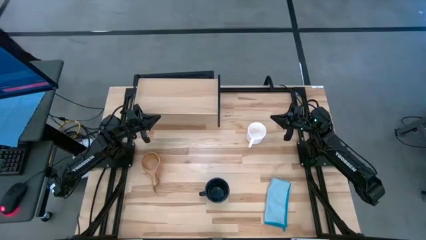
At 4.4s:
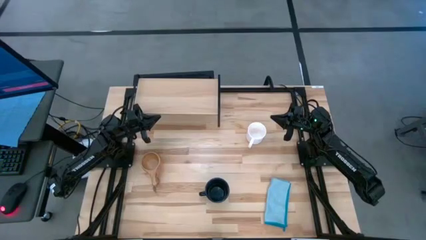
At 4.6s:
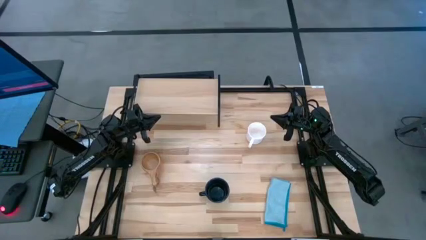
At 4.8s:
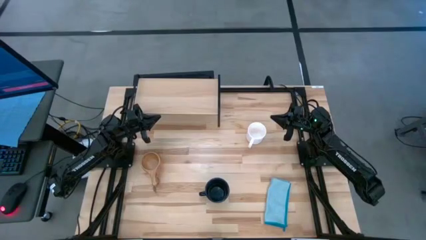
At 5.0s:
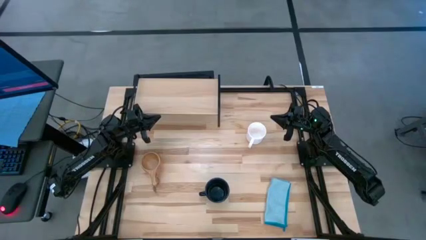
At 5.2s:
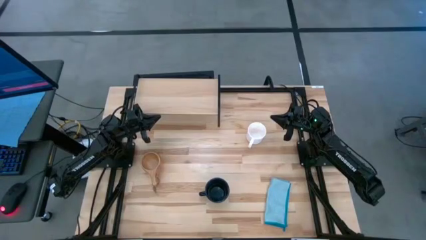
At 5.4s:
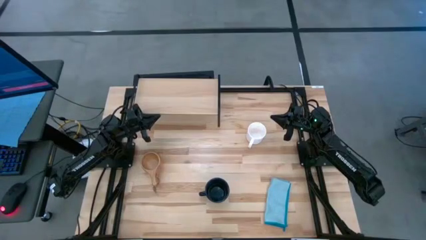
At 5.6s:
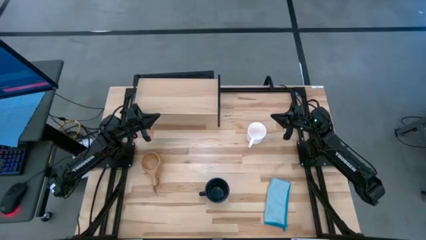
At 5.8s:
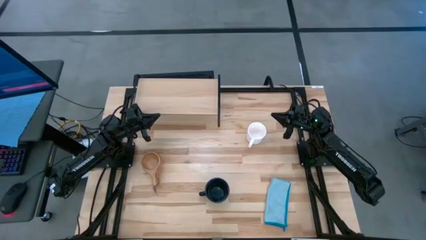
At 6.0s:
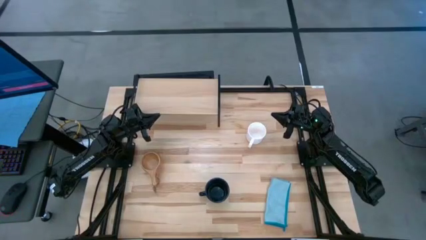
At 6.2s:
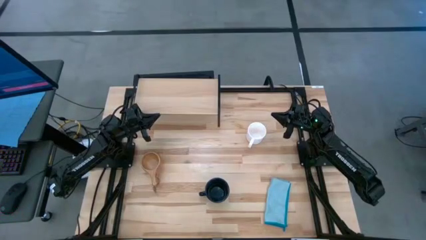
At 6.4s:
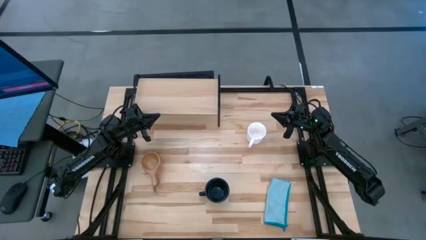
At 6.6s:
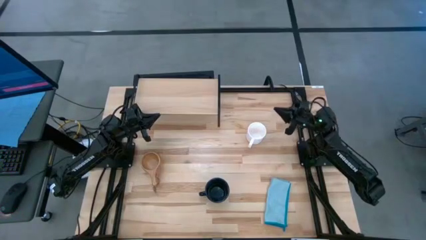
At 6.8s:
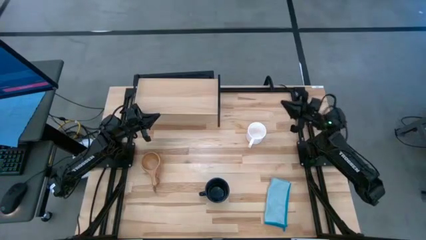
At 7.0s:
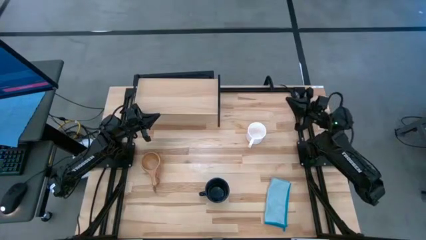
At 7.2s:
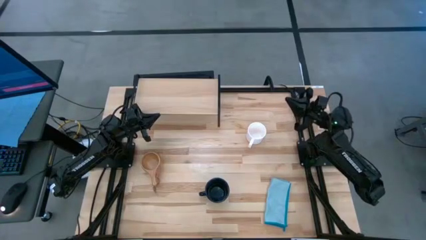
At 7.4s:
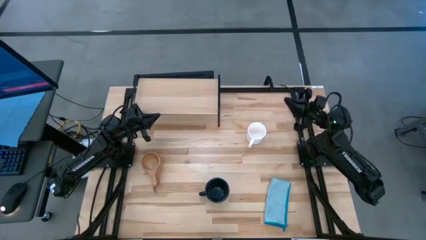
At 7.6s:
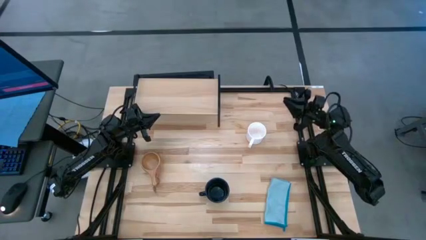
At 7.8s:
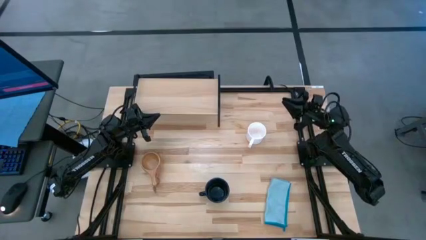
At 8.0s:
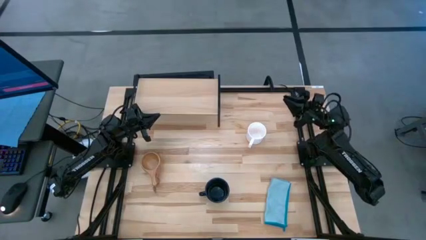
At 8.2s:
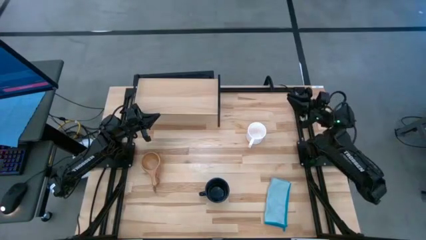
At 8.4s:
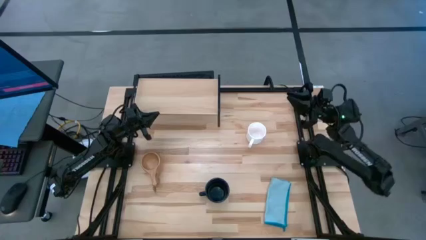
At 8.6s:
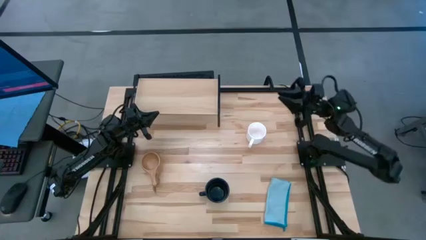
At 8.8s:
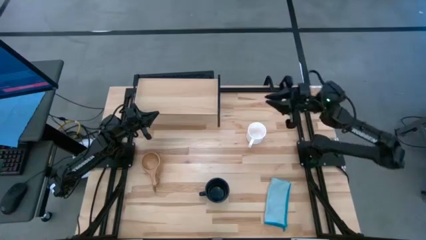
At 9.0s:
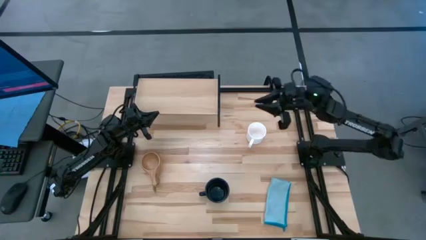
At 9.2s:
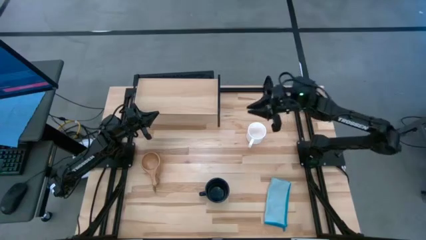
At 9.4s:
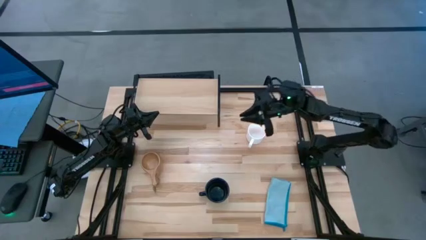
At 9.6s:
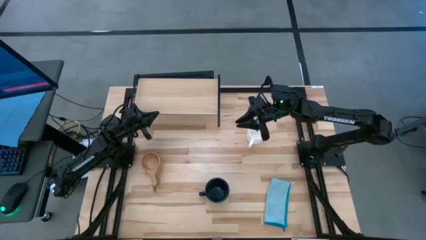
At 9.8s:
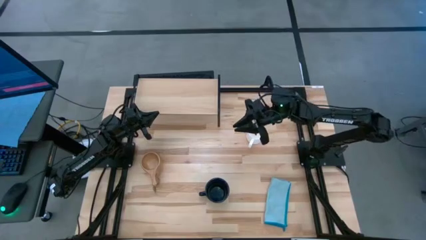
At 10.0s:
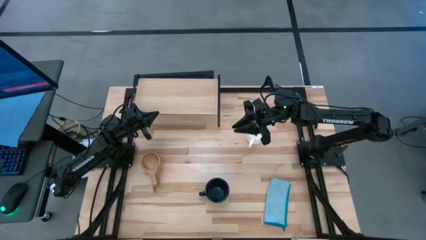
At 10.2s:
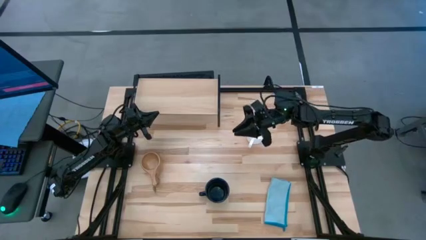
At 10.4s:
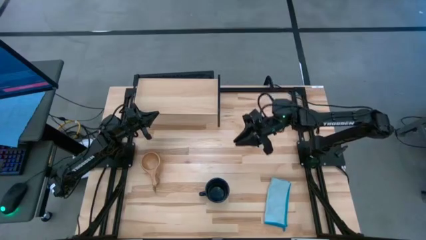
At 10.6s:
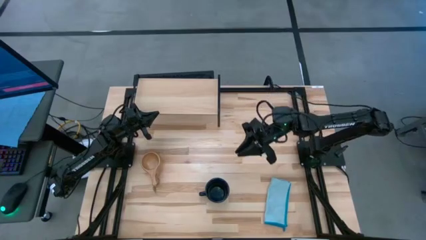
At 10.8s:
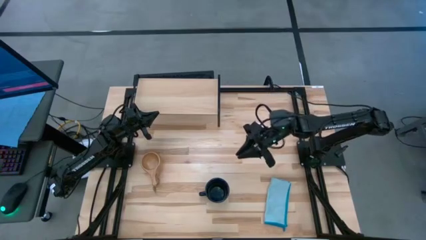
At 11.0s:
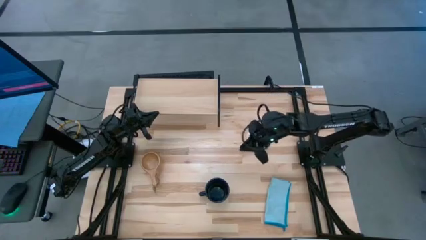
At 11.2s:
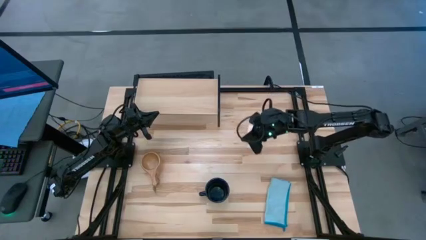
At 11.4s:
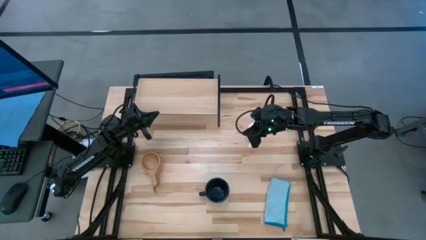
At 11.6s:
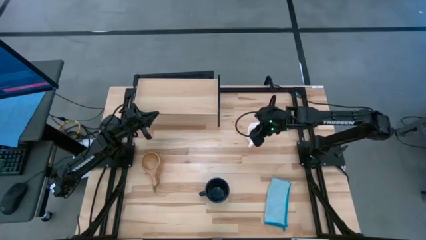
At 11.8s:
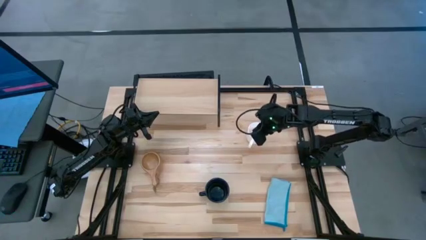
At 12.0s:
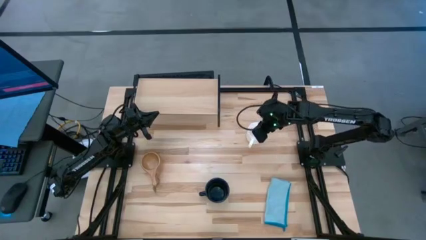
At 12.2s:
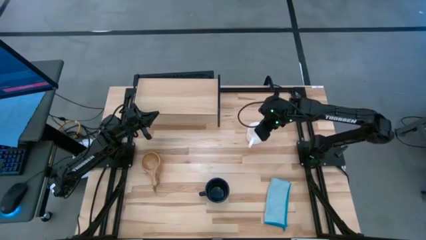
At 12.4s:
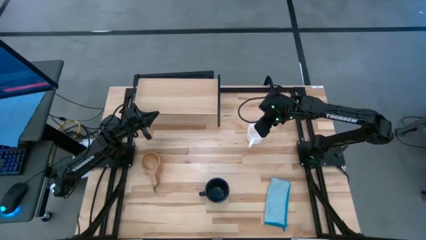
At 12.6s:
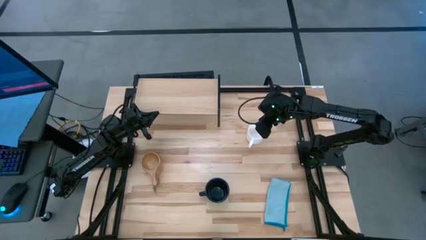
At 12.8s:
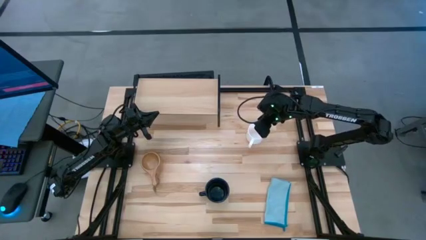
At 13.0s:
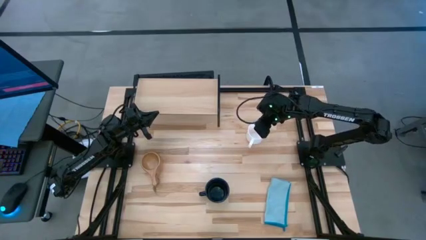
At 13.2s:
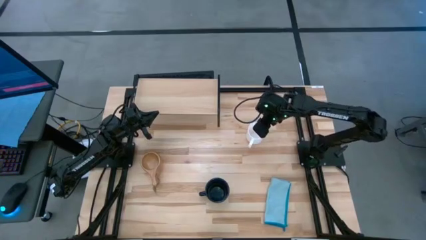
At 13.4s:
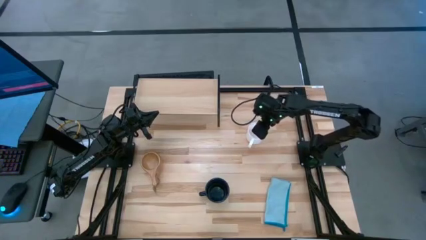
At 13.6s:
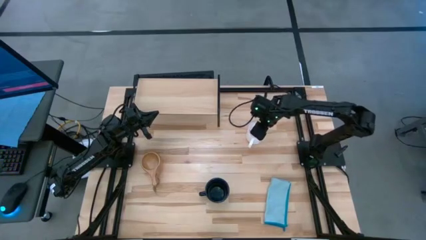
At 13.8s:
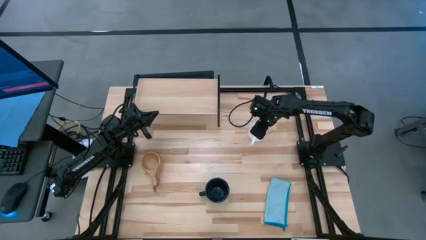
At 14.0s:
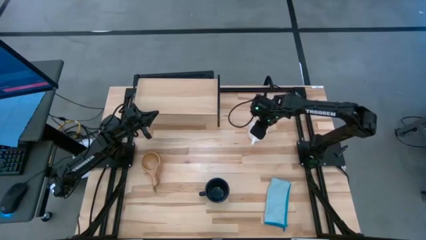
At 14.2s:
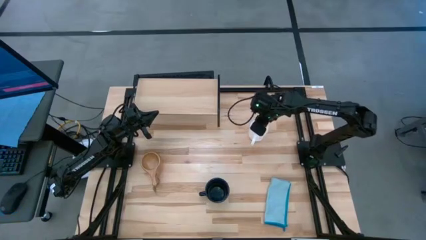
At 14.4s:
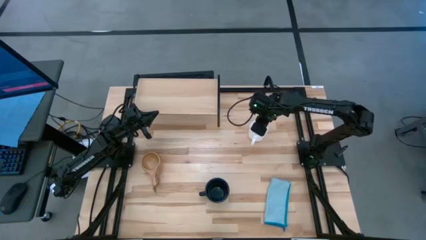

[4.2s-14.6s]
Task: Stack small to large cups/mugs on shelf
Put the white mug on the shelf

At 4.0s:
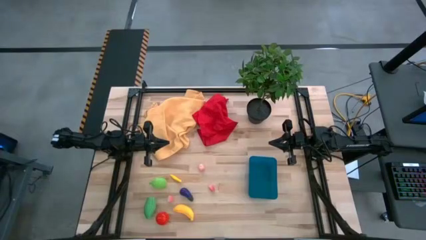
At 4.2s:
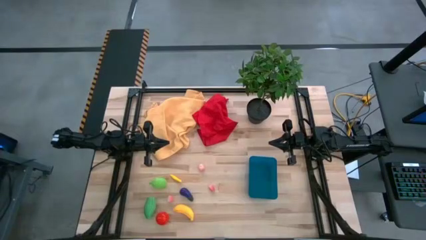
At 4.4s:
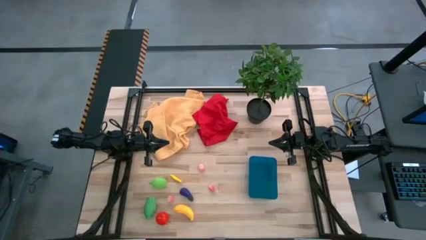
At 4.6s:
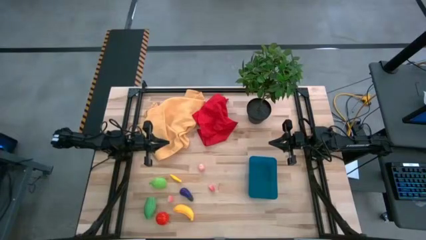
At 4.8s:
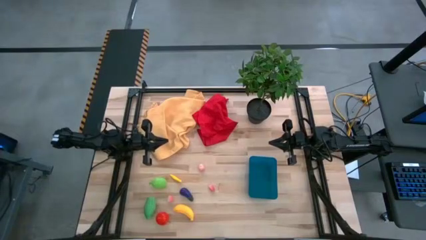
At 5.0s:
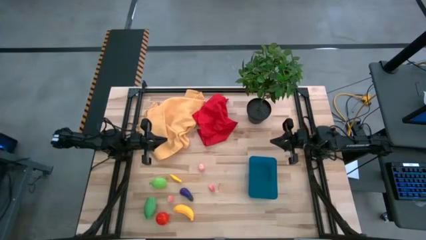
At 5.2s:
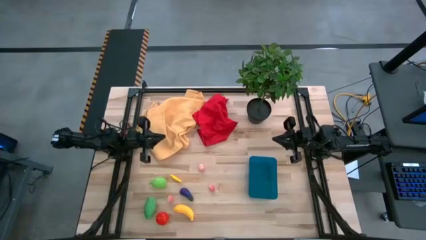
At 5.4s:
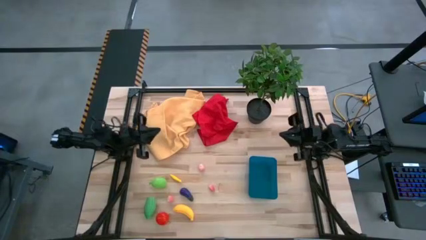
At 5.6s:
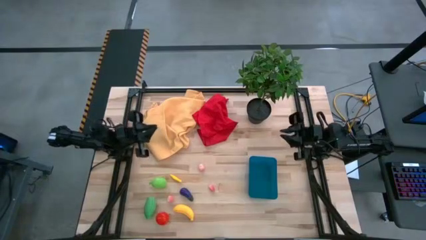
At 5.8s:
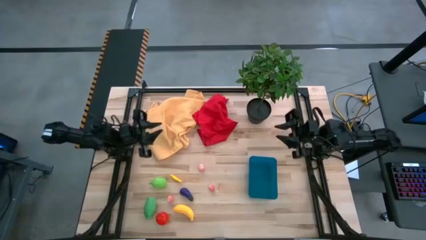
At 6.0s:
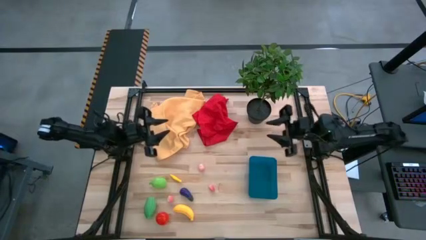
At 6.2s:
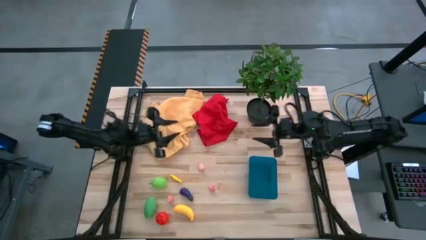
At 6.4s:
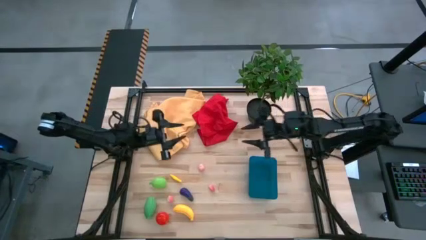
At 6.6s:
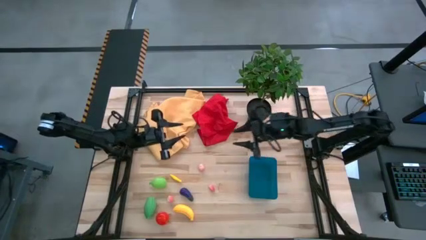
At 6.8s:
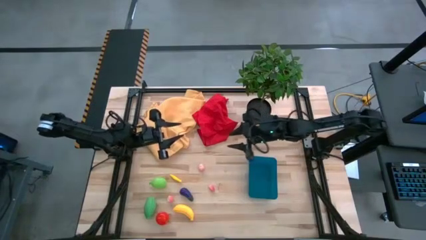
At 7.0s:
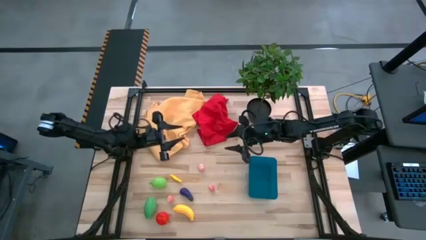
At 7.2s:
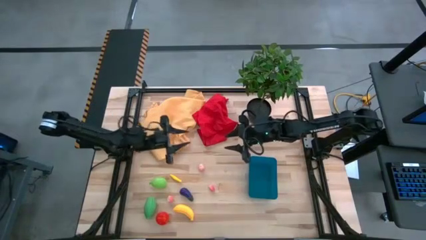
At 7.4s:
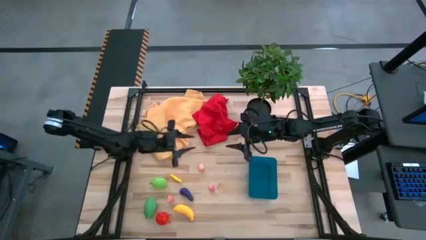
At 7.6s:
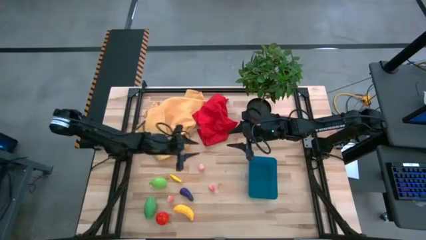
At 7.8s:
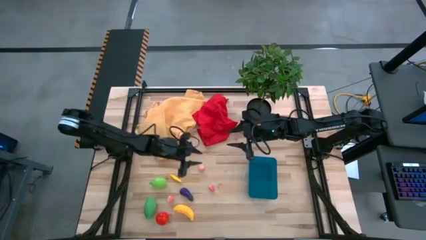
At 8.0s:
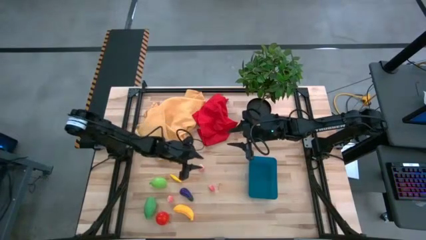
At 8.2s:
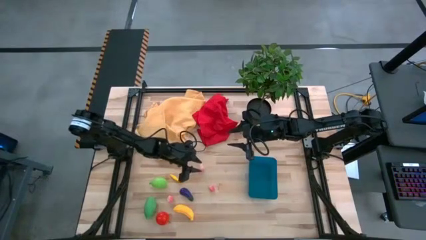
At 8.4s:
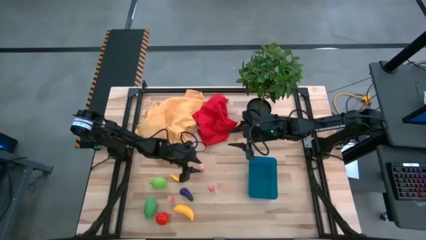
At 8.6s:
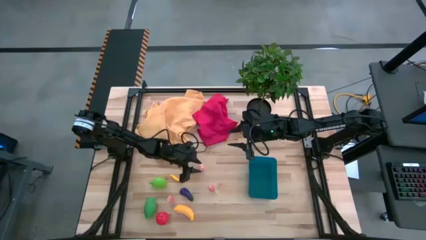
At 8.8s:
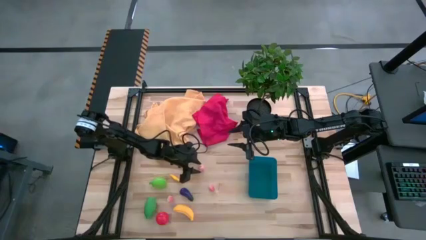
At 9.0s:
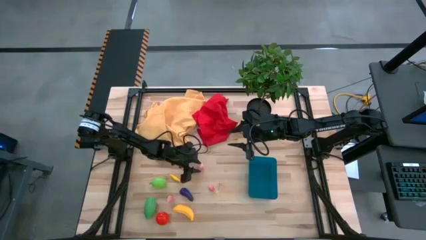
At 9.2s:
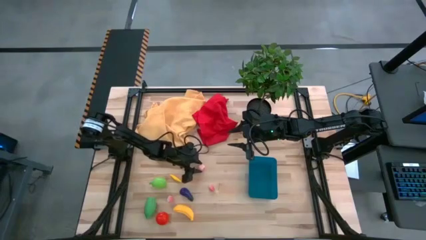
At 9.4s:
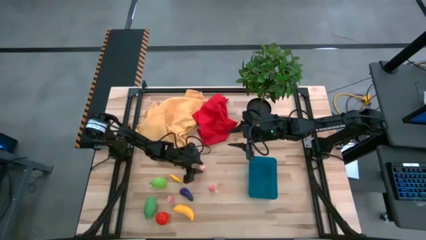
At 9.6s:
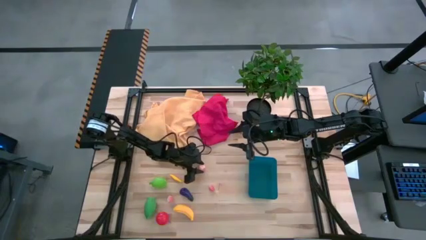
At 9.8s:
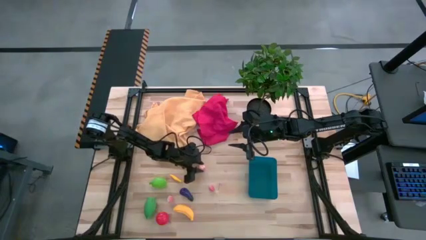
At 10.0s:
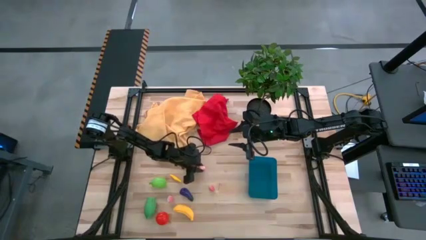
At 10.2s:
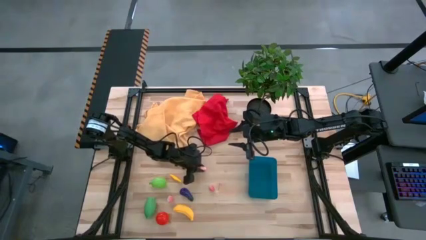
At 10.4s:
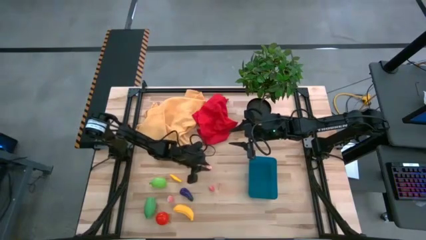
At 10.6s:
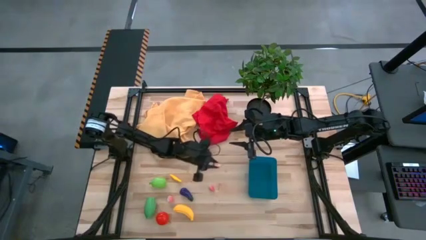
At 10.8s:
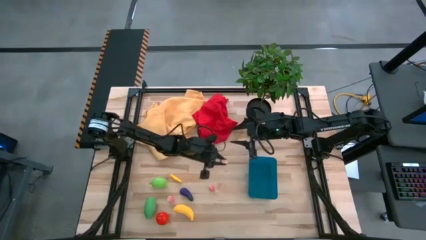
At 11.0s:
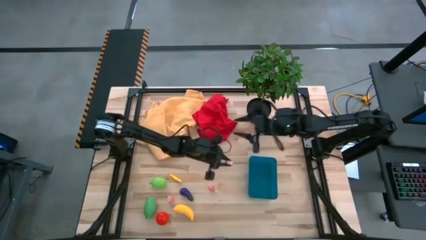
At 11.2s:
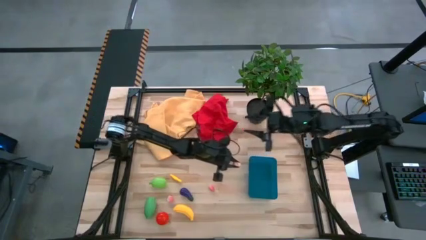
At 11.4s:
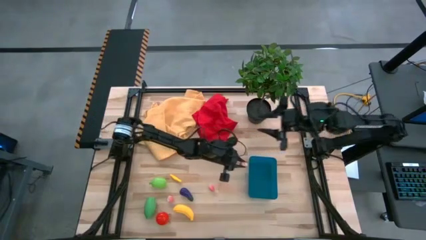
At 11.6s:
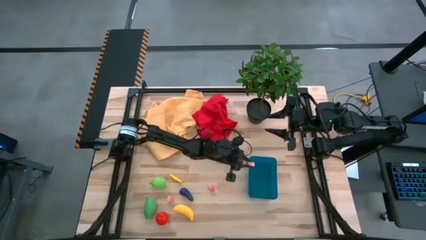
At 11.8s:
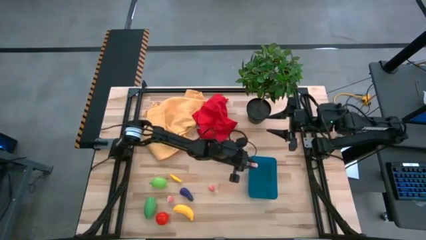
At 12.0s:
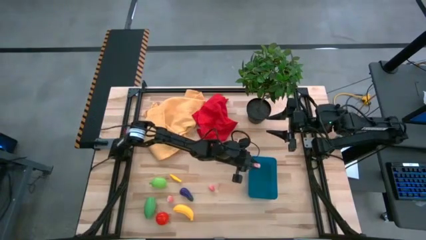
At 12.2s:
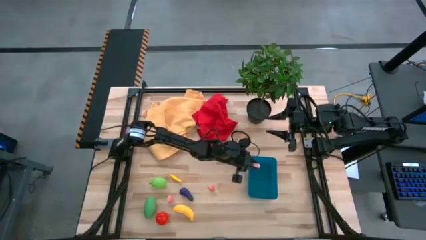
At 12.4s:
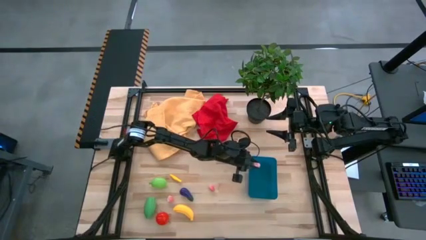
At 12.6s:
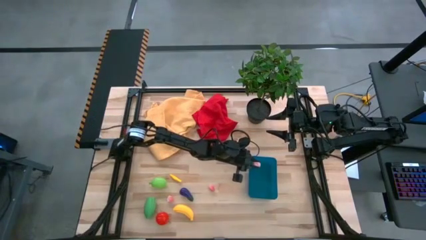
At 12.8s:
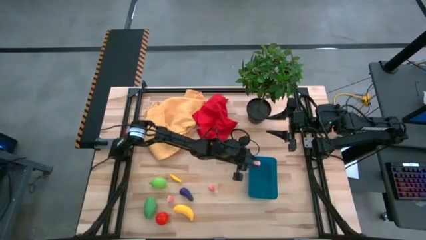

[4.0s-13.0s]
Task: Pick and placing Produce into tupperware
Put the top peach into the blue bin
